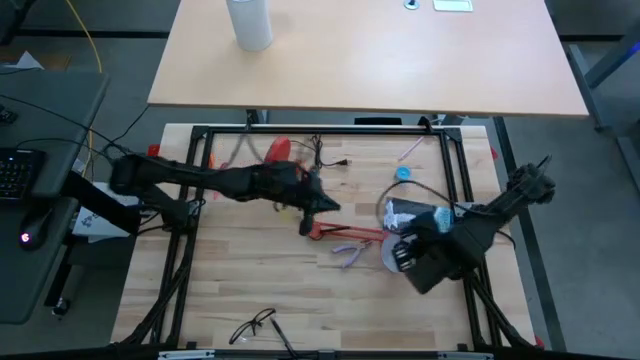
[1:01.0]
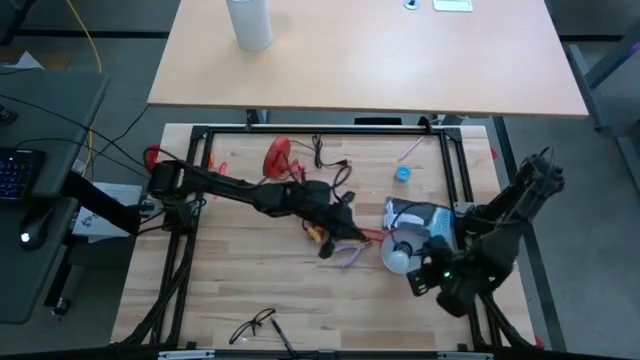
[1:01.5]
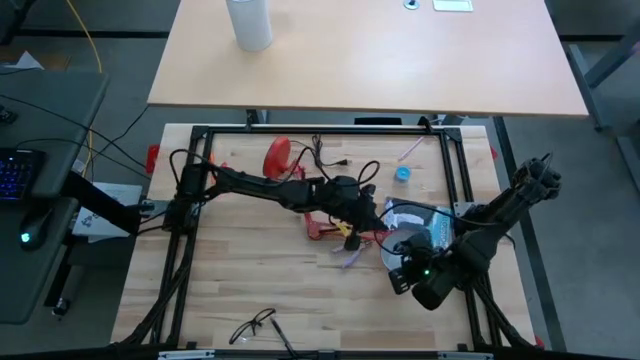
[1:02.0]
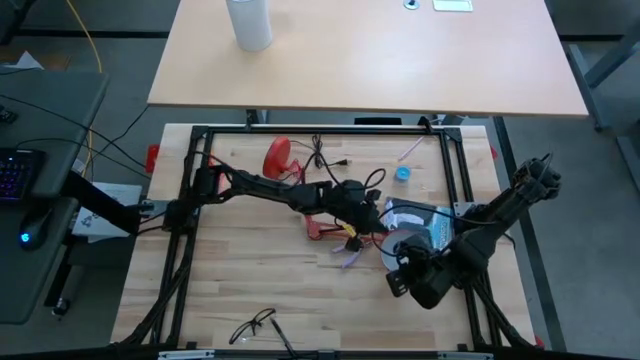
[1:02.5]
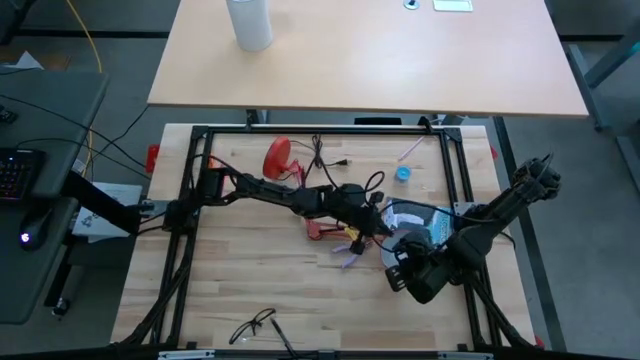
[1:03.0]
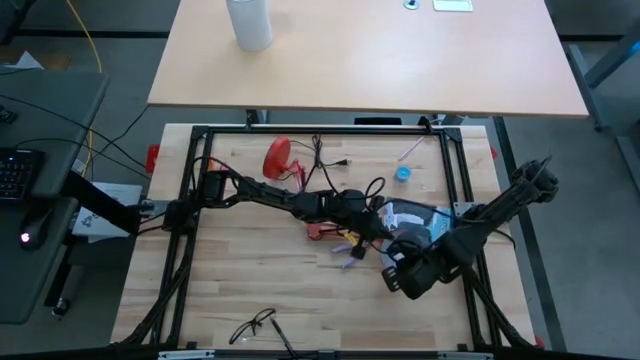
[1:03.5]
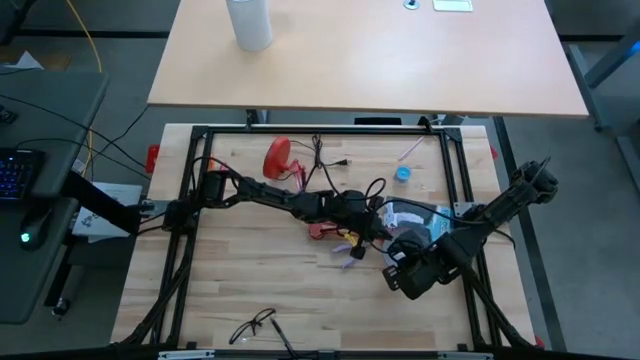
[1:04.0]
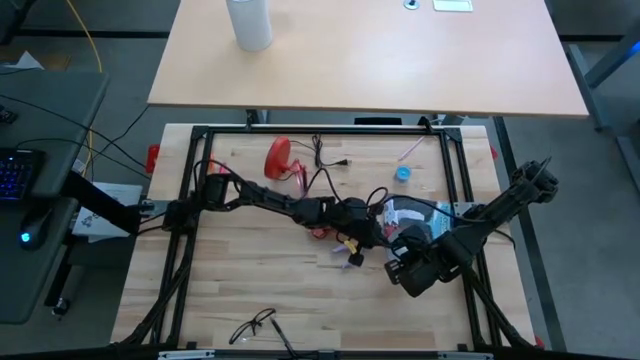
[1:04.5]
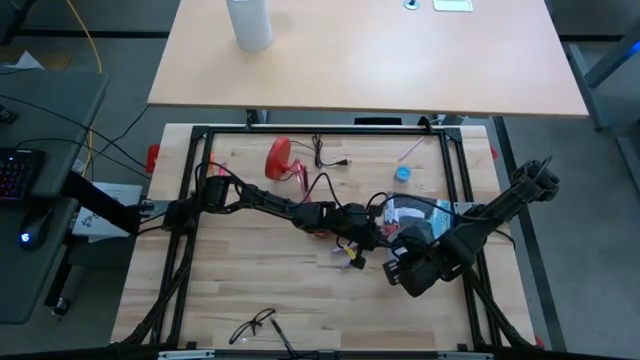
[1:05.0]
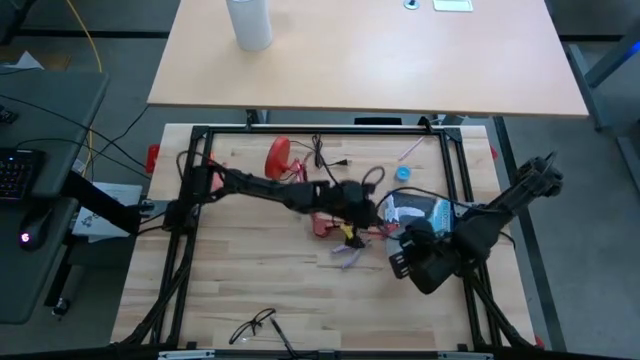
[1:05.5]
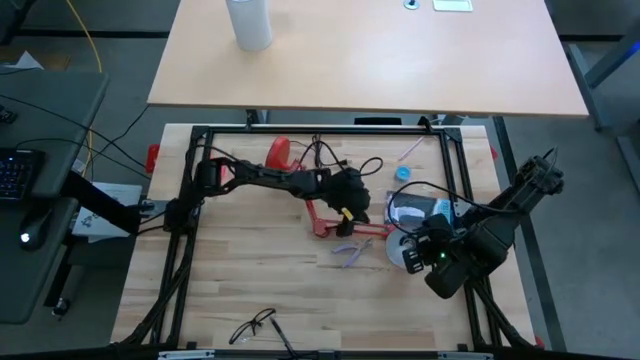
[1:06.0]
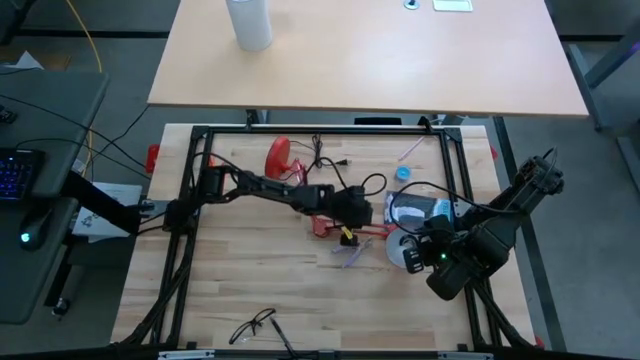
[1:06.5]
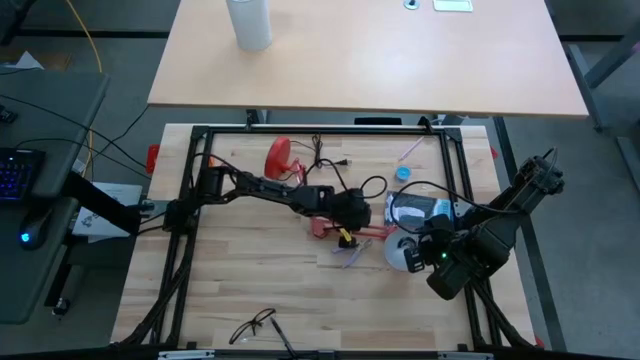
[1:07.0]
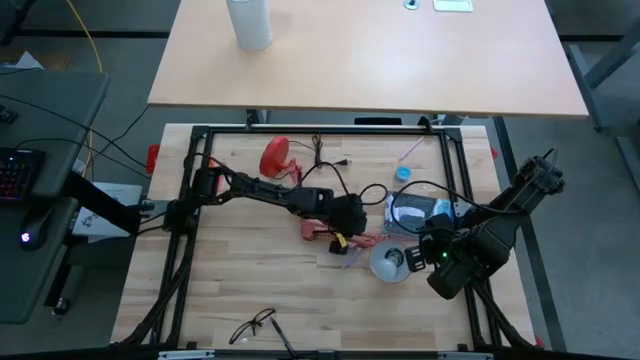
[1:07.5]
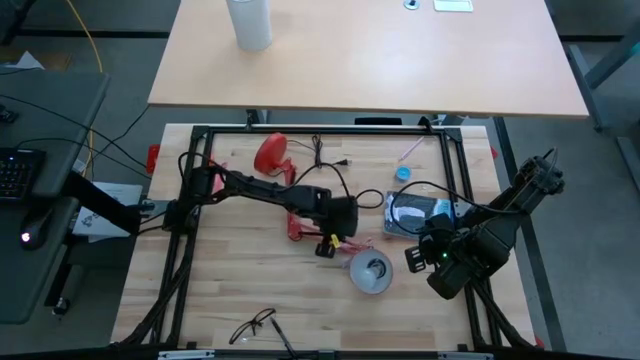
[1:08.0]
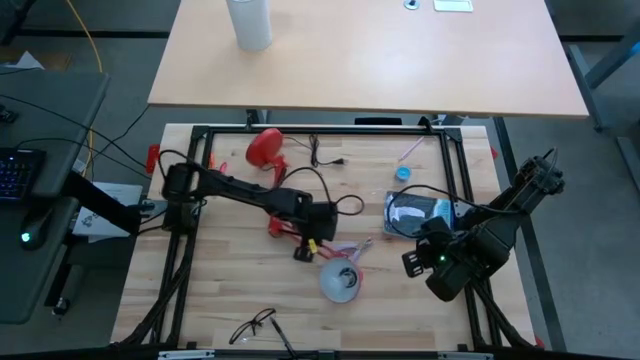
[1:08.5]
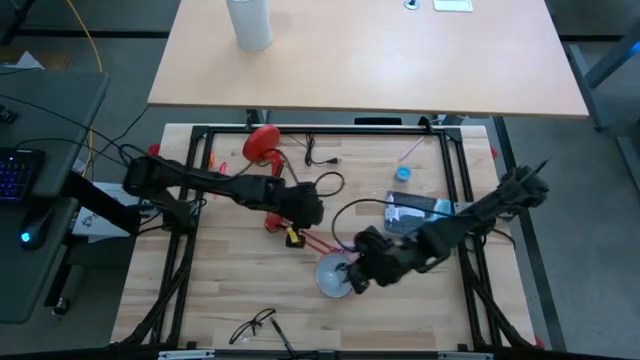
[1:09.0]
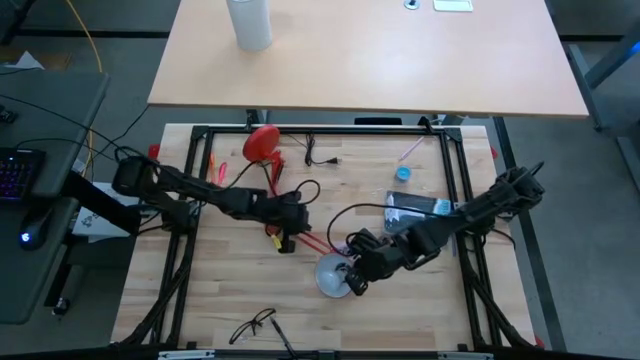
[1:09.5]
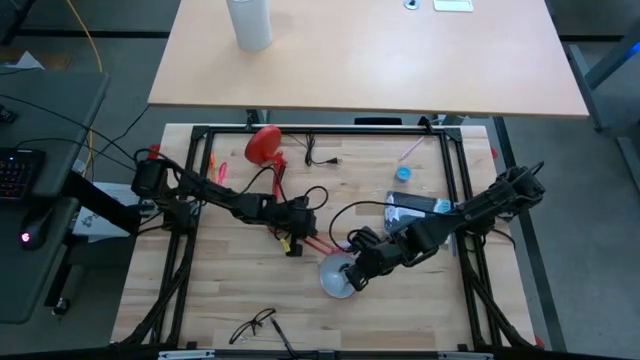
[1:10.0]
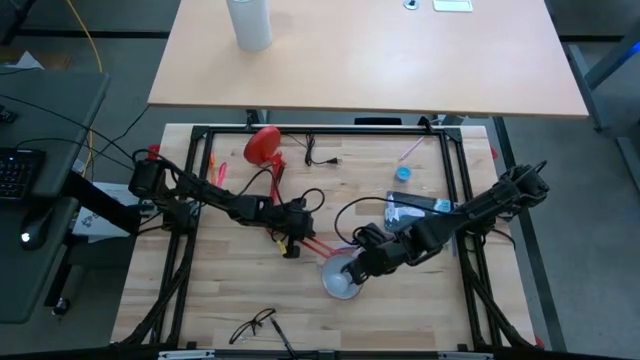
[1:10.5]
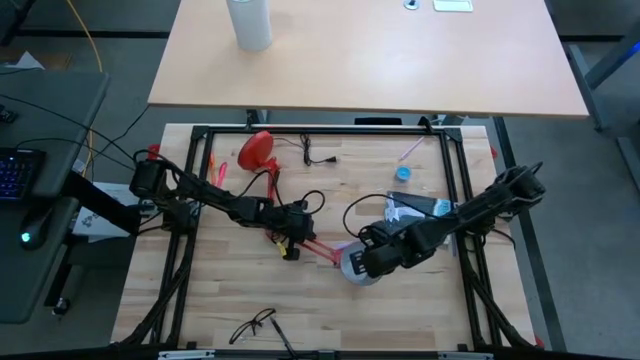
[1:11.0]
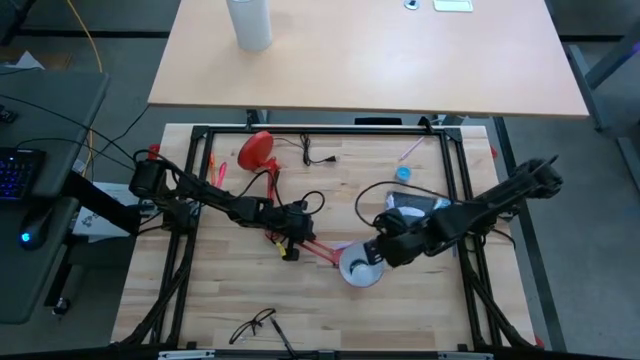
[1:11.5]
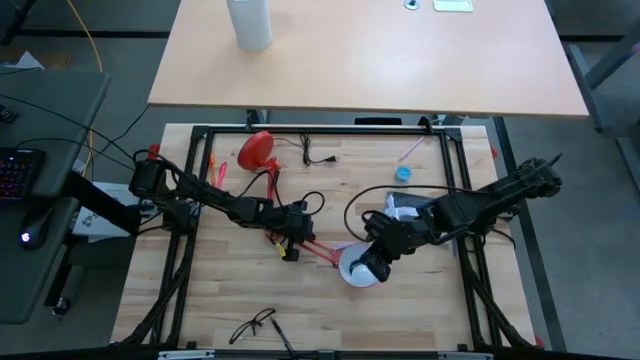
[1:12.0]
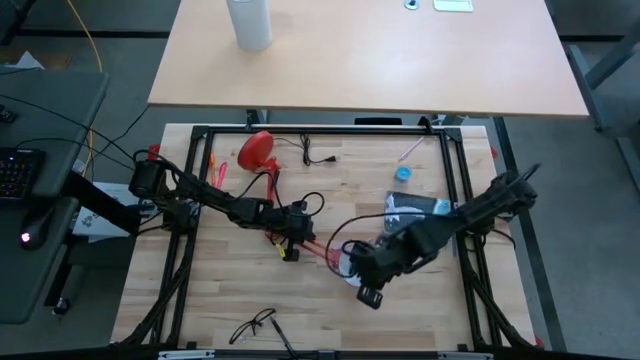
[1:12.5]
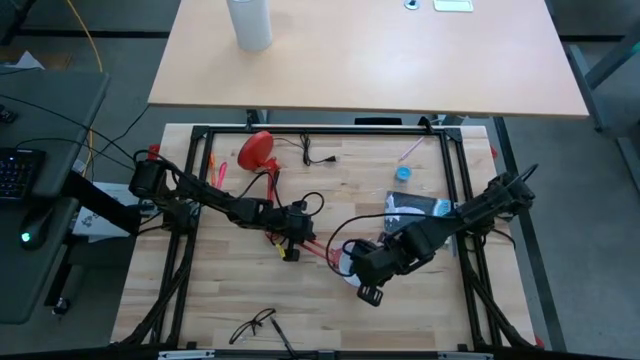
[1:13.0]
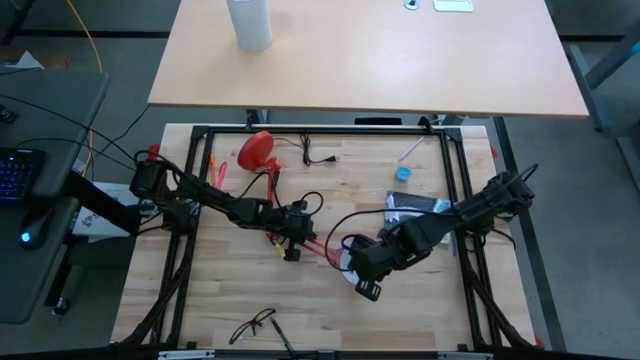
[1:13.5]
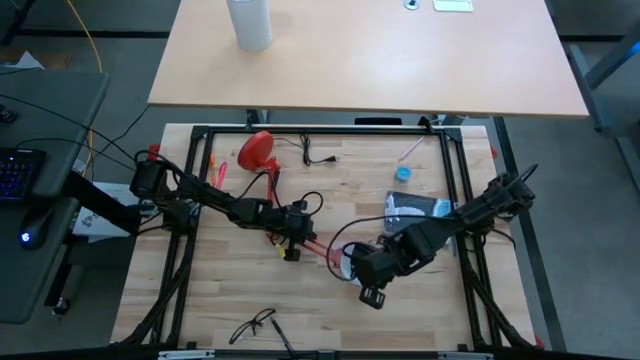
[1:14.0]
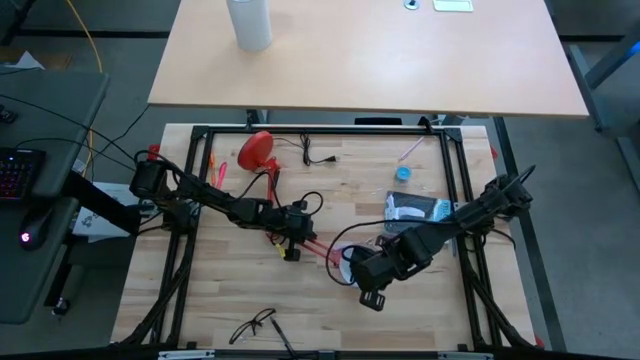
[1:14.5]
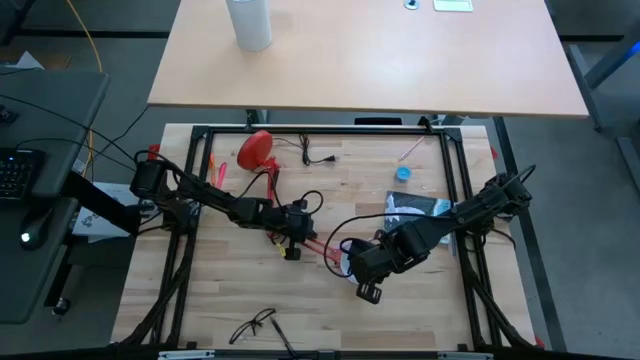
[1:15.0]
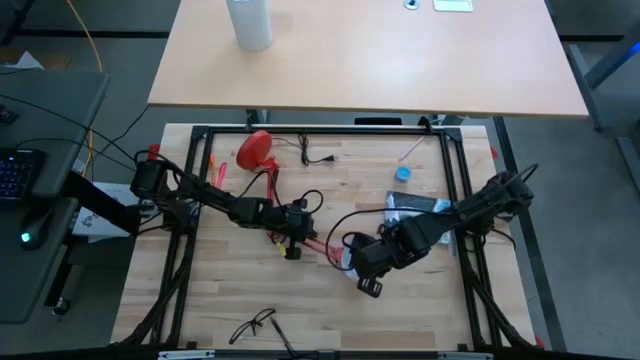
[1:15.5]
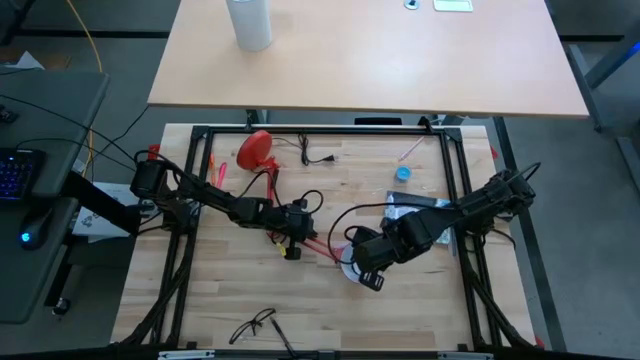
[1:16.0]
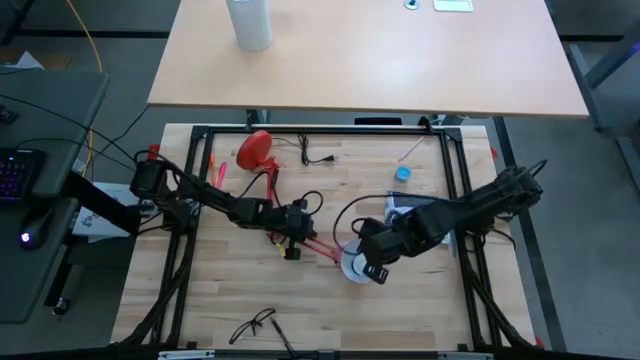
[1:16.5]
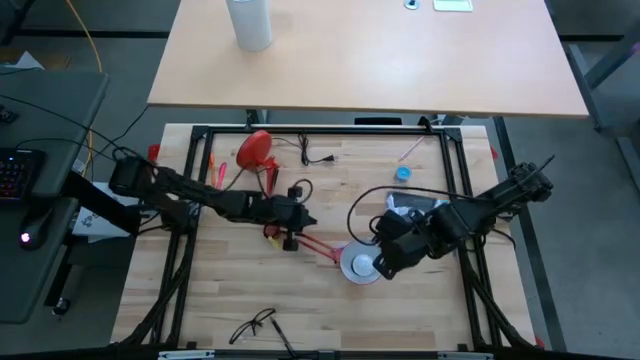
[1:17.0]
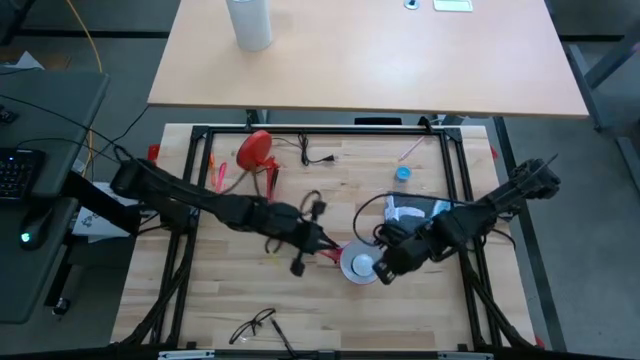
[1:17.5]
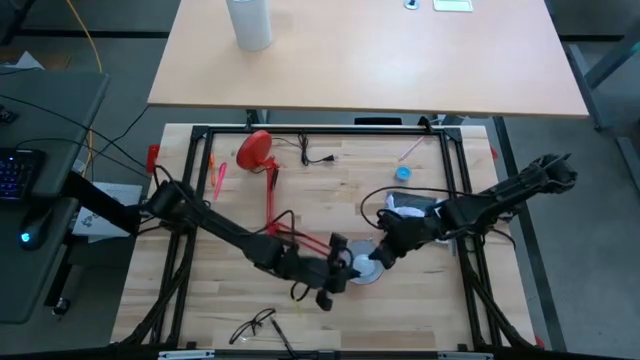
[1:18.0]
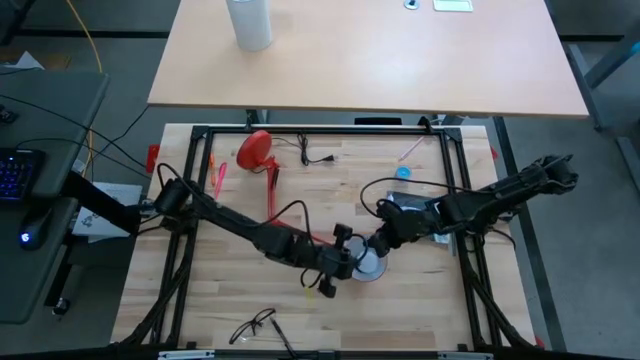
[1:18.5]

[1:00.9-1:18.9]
Task: Screw lightbulb
Insert the lightbulb into the desk lamp

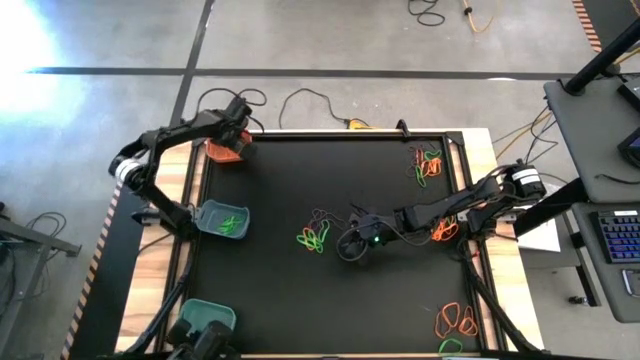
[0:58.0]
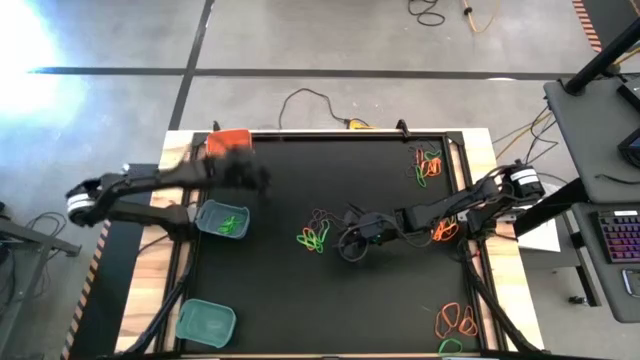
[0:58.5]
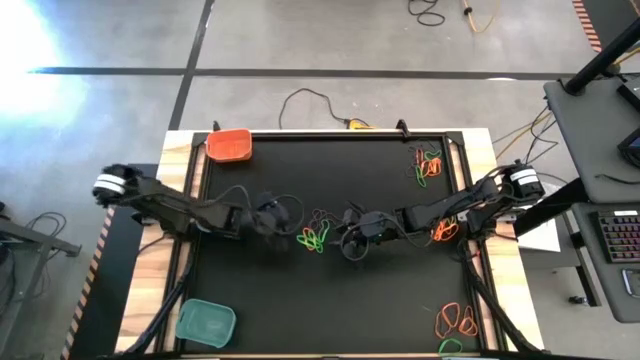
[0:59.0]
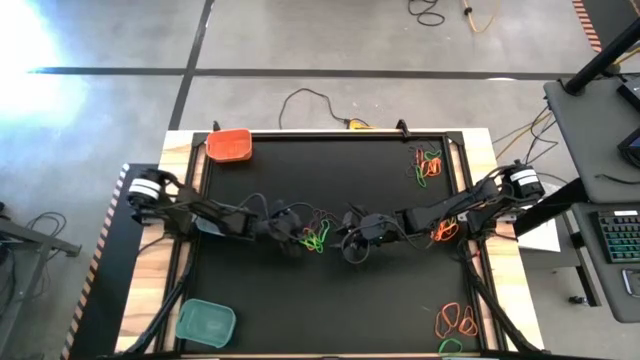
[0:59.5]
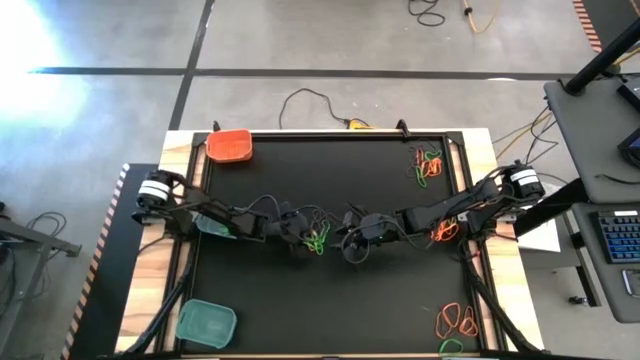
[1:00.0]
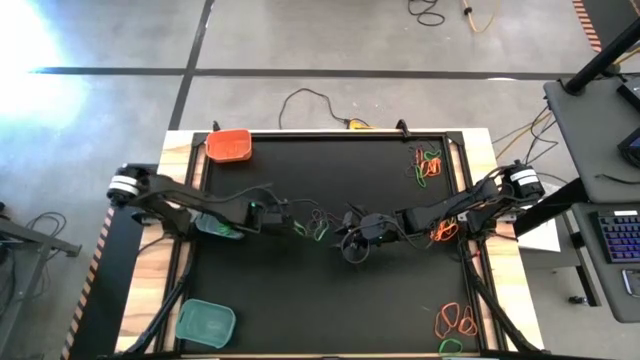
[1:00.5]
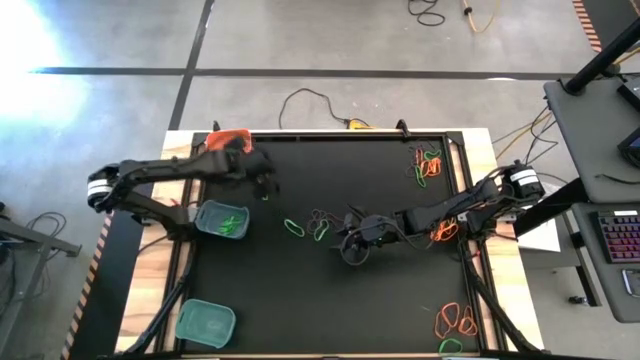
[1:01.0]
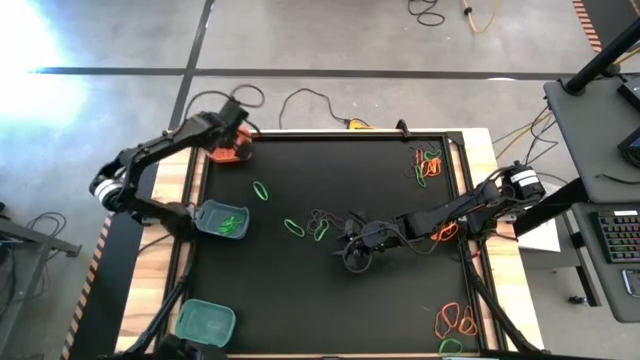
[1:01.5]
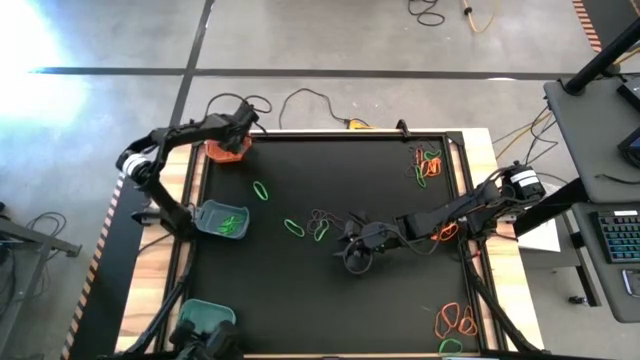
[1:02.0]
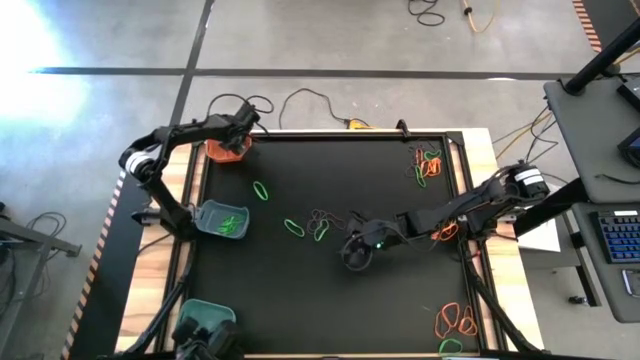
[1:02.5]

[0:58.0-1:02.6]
Task: Sort rubber bands into baskets
Put the orange rubber band into the orange bin
